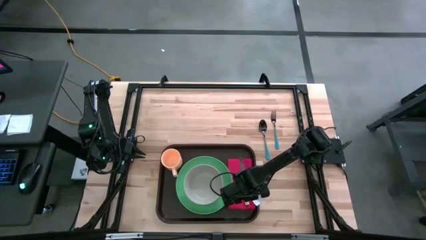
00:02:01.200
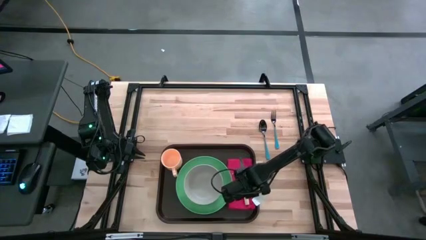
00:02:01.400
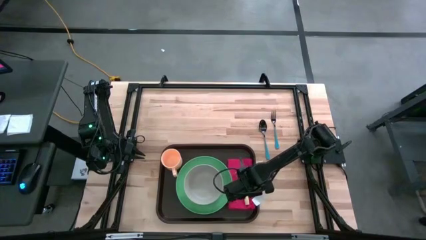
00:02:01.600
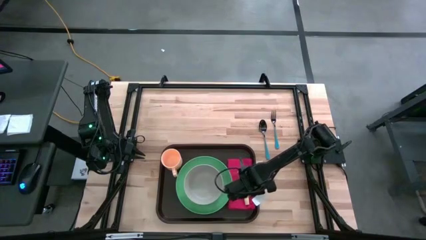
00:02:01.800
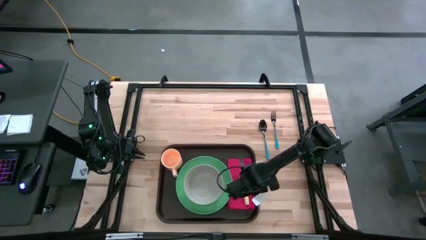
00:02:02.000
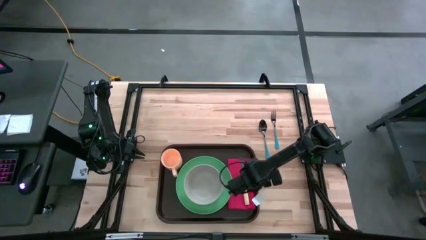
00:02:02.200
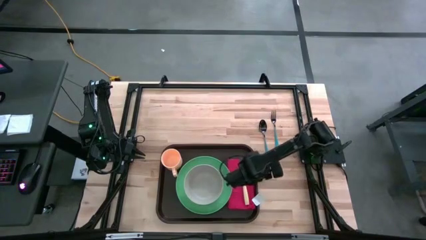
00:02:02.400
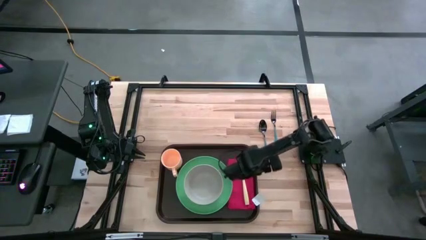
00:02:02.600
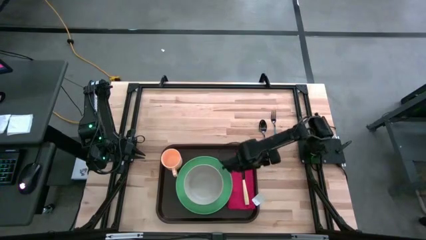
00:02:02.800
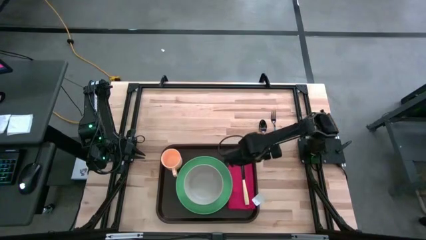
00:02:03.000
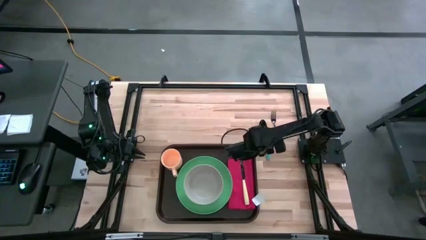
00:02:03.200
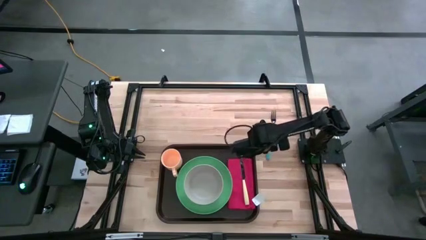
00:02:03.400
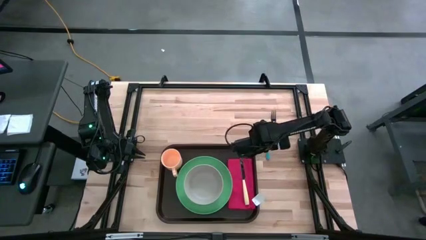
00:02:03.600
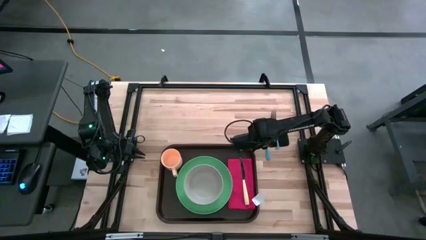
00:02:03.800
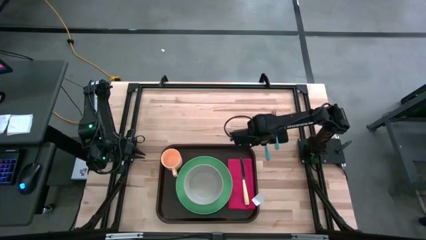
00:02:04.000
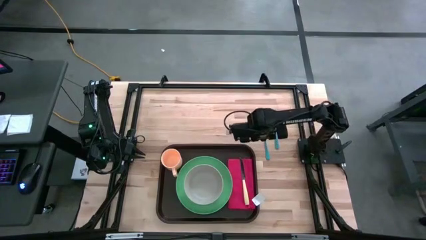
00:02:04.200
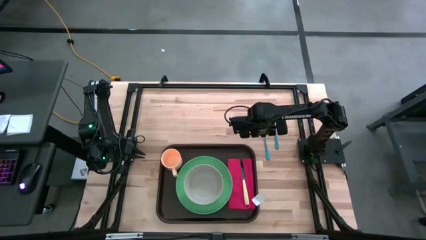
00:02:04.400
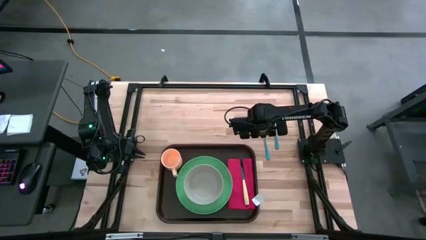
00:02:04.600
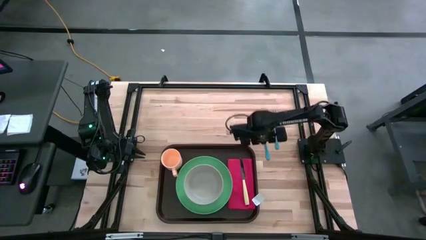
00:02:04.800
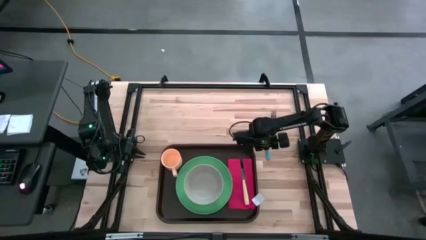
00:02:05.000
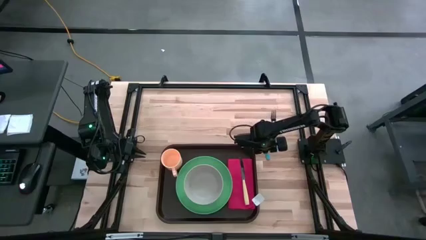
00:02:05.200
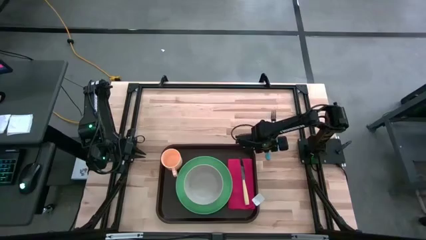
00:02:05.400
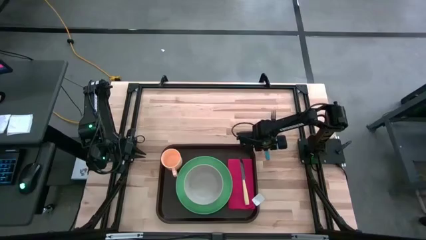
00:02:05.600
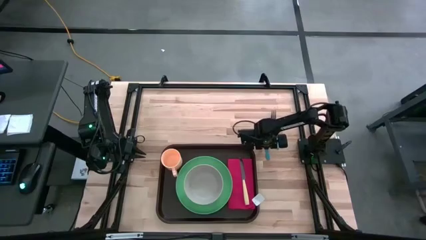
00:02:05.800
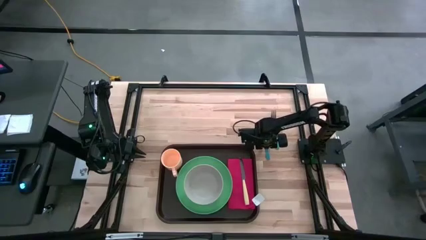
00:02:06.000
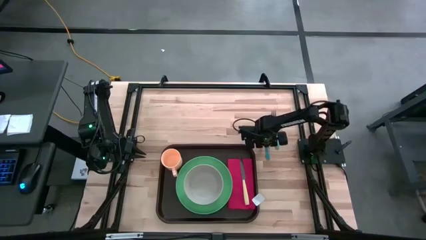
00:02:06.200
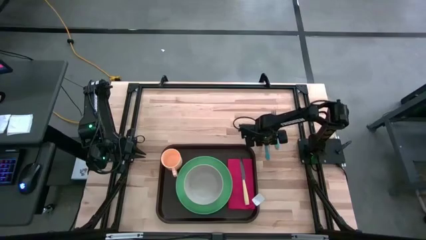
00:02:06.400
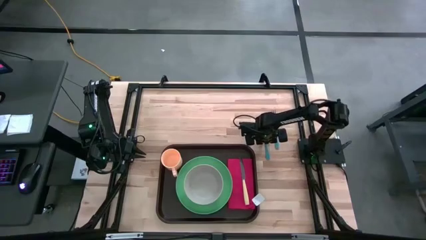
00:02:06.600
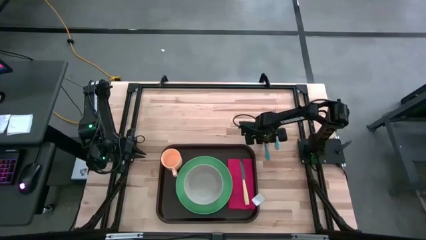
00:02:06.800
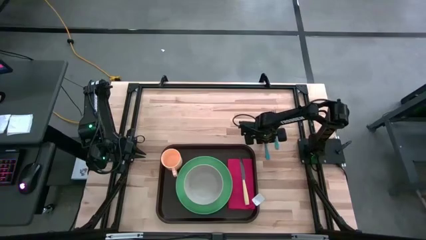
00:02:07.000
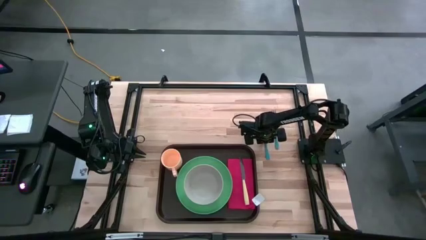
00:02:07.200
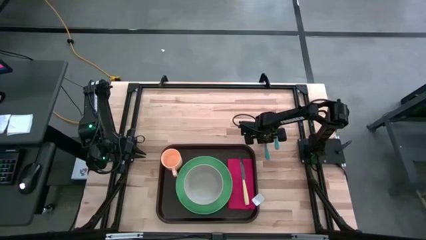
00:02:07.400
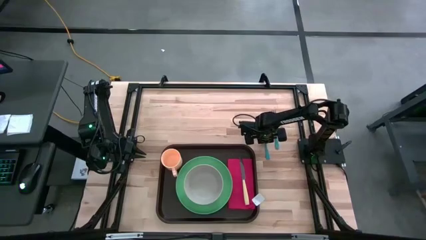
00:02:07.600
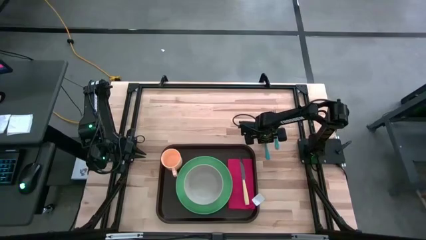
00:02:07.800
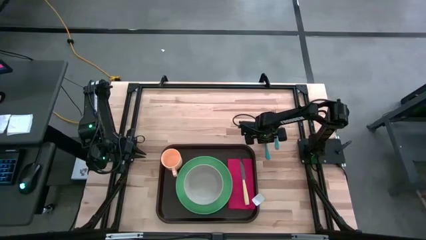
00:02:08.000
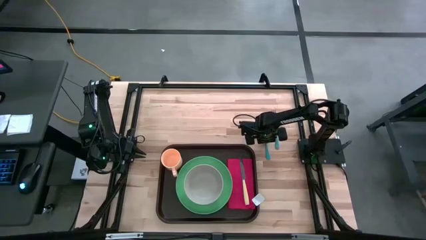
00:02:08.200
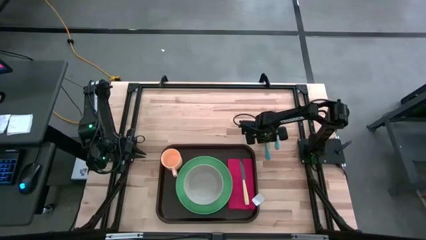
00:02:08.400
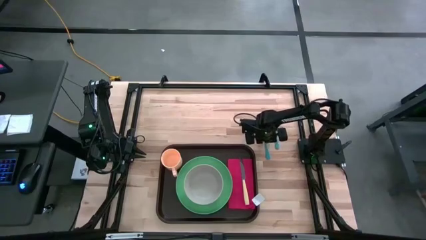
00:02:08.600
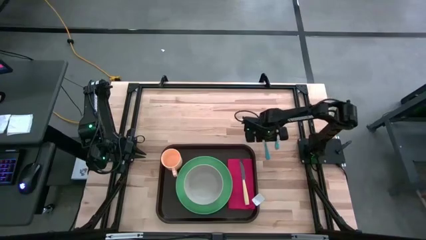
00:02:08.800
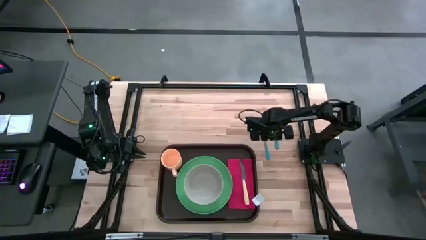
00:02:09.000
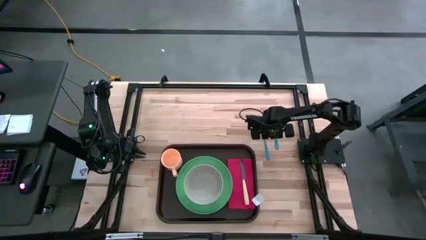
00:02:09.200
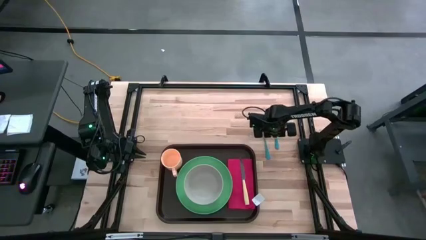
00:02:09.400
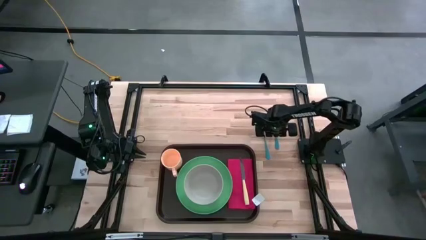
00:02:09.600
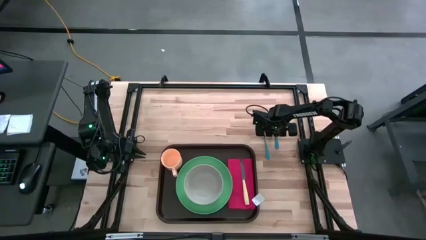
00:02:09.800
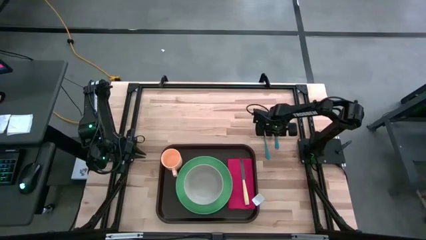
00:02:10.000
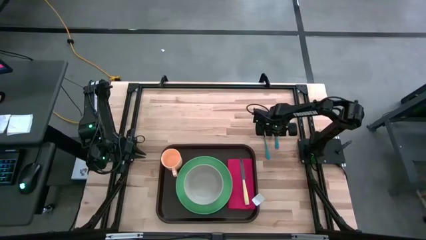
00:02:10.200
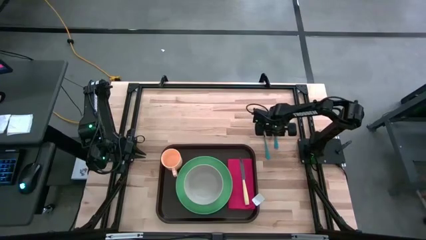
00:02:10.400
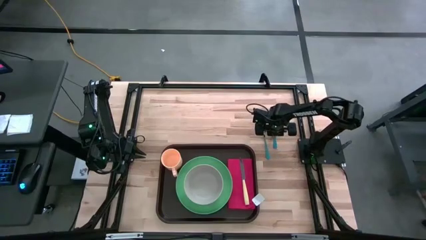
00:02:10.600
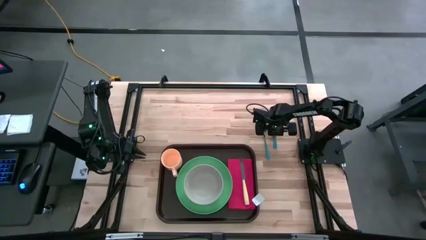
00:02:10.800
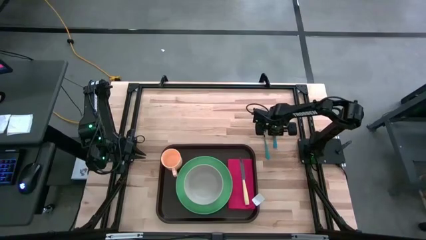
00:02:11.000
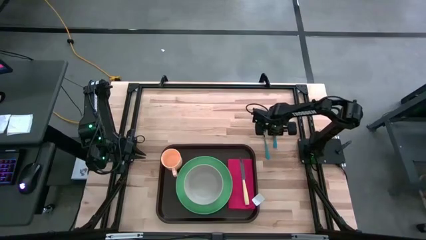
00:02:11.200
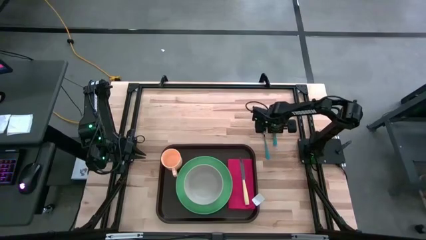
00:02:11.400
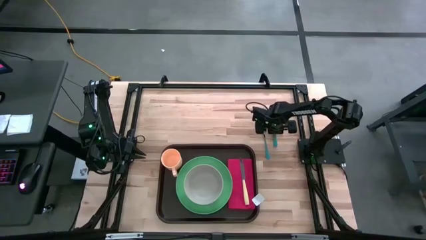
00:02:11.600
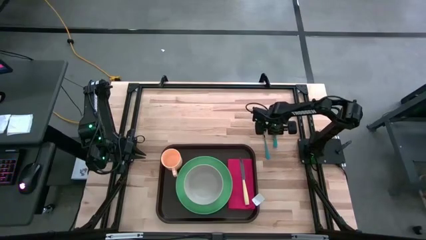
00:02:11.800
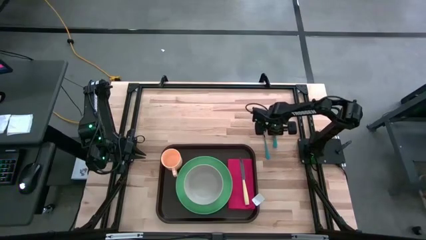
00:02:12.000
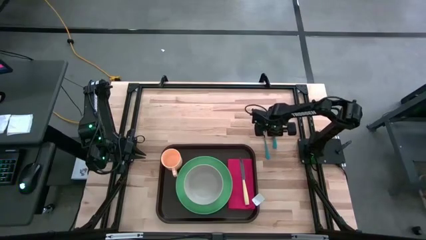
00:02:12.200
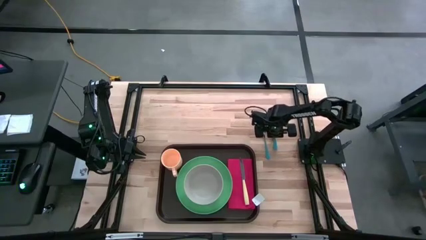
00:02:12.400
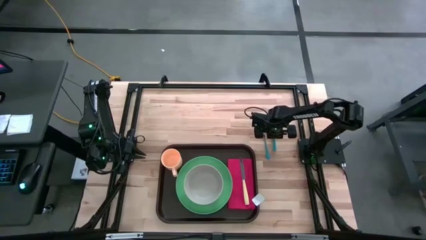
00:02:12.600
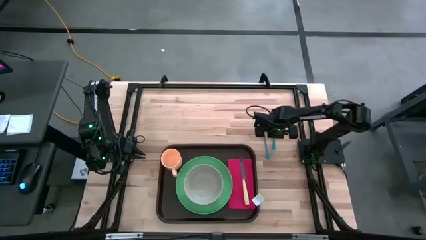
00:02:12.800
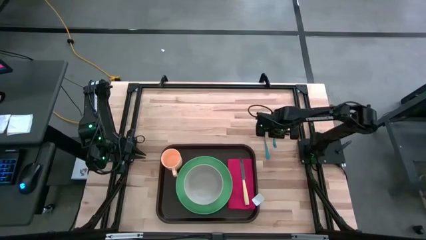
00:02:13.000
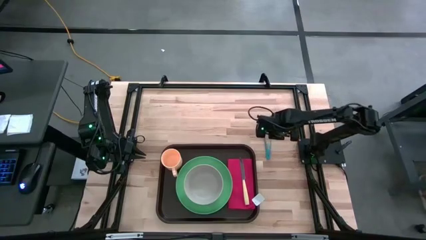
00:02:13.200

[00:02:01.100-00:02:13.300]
Task: Set up tray
Put the blue fork on the red napkin to the left side of the yellow knife

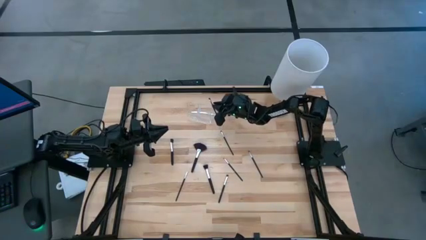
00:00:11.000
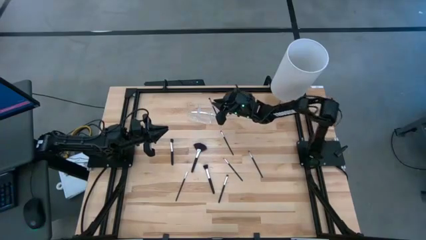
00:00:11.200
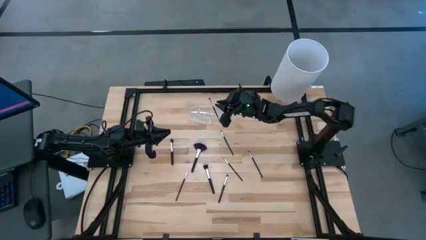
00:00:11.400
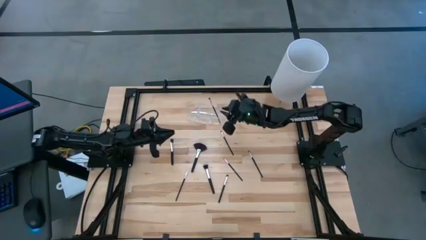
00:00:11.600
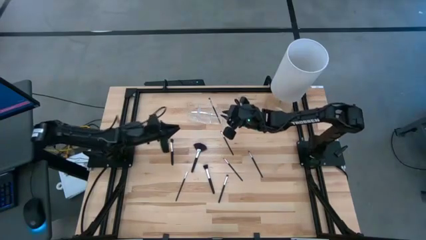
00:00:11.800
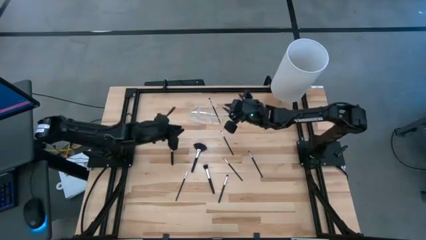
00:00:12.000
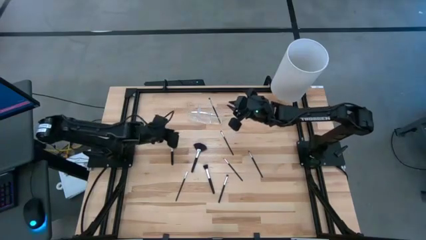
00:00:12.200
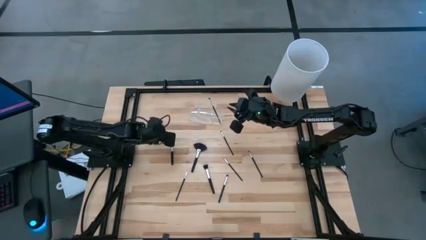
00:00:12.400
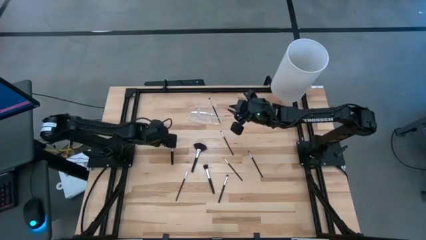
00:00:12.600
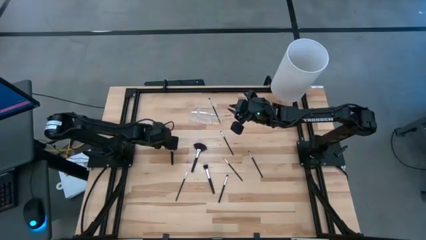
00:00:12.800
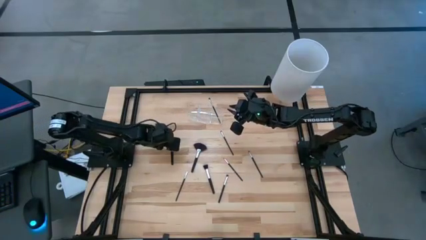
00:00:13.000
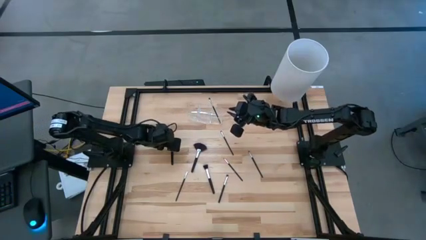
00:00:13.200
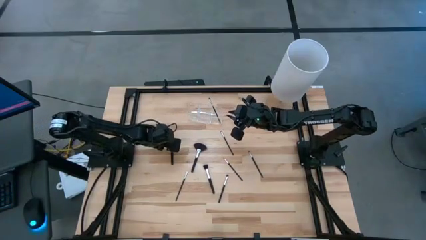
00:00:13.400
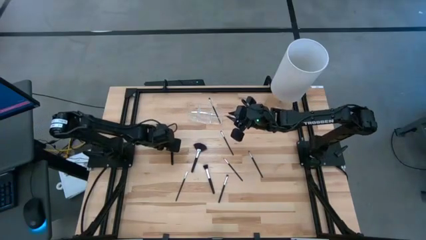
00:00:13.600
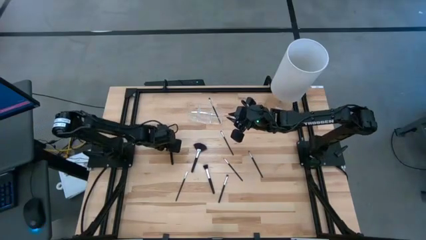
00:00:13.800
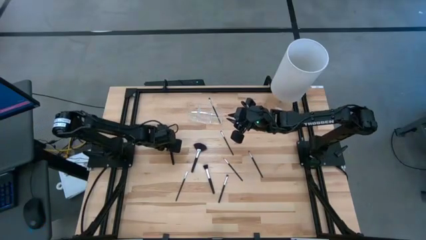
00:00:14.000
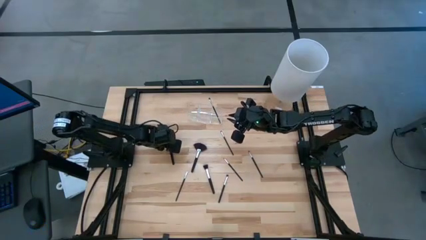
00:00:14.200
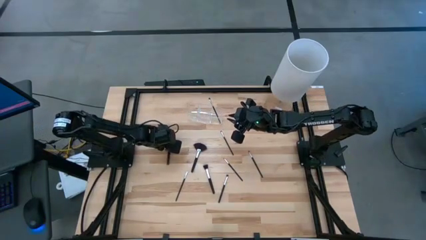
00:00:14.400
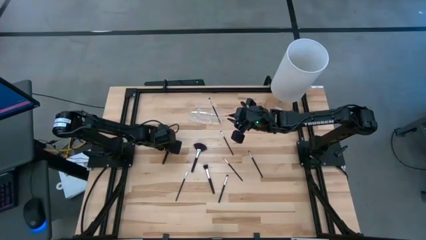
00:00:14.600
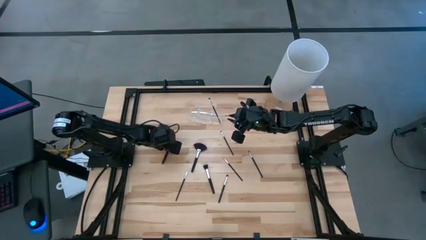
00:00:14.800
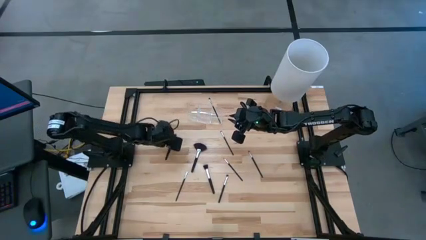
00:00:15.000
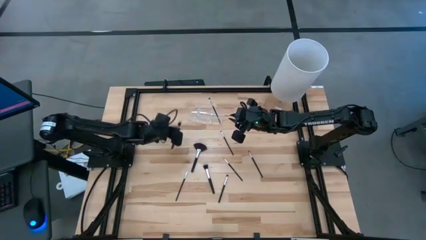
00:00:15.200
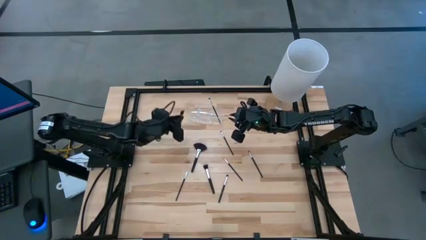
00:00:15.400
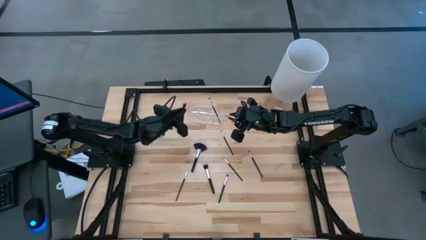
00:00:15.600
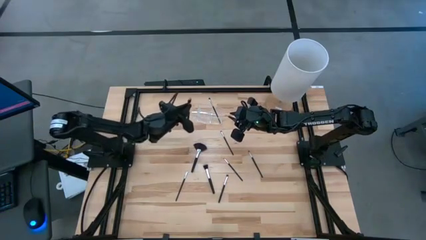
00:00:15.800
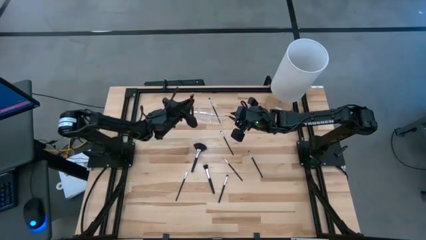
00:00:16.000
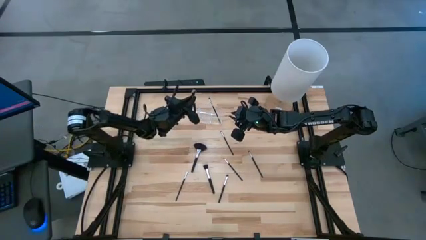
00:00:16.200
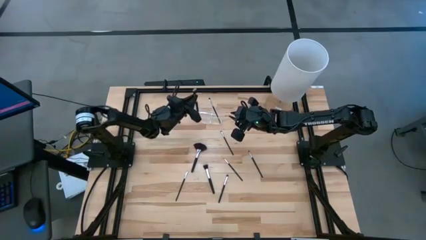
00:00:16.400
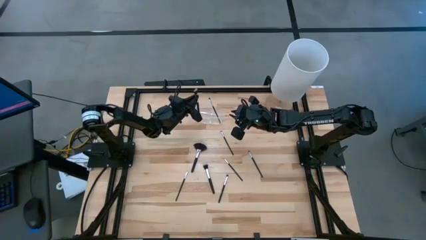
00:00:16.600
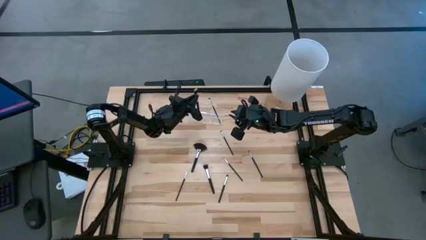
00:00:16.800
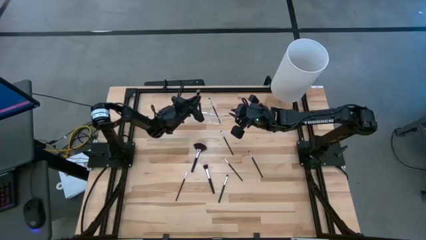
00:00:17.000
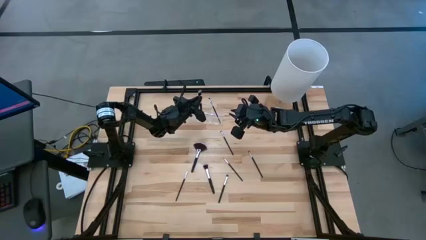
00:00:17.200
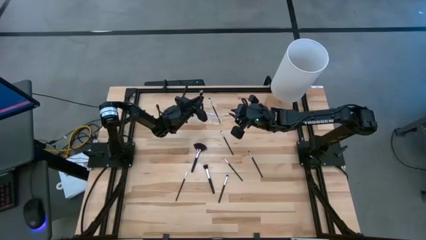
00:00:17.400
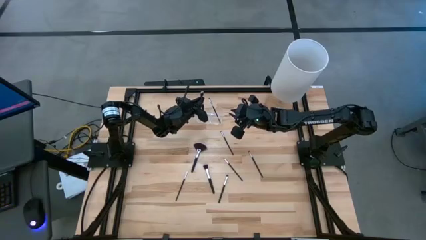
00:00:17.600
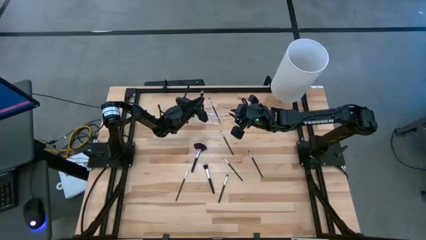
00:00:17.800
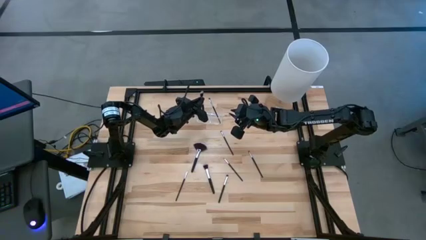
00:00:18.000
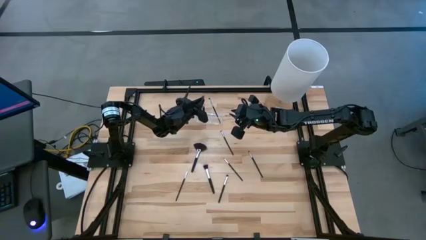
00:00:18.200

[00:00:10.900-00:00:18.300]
Task: Pick & Place Makeup Supplies
Put the makeup brush into the transparent organizer
